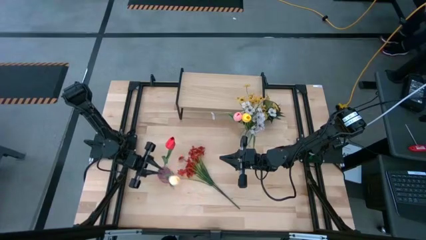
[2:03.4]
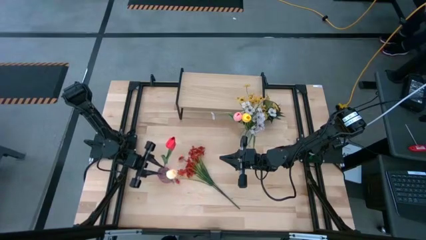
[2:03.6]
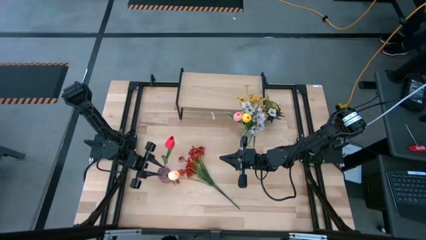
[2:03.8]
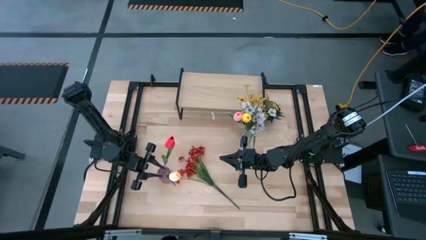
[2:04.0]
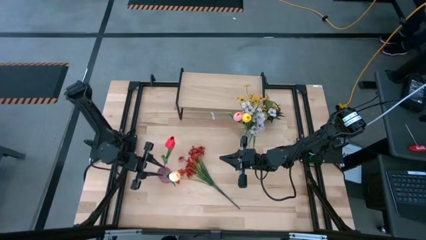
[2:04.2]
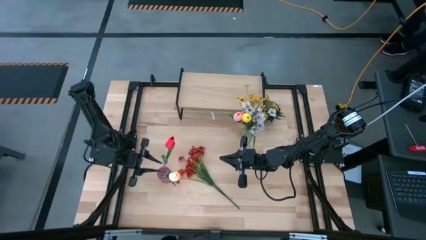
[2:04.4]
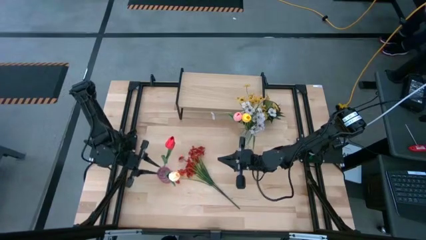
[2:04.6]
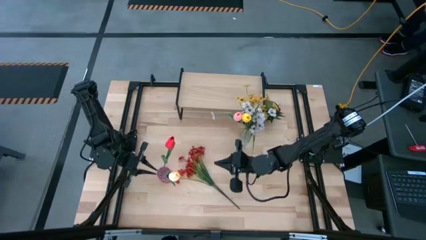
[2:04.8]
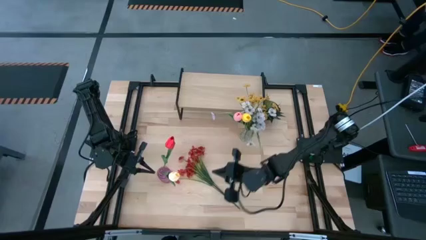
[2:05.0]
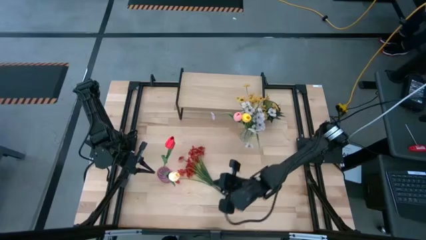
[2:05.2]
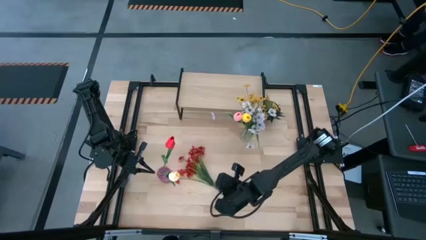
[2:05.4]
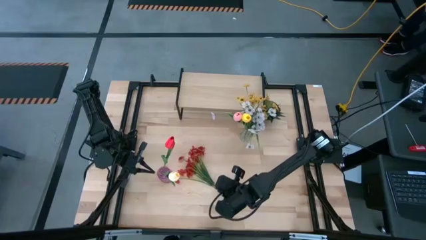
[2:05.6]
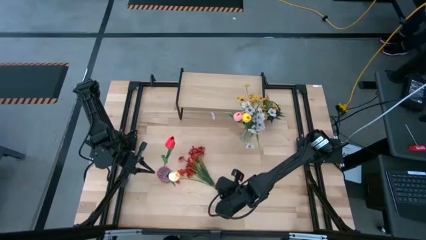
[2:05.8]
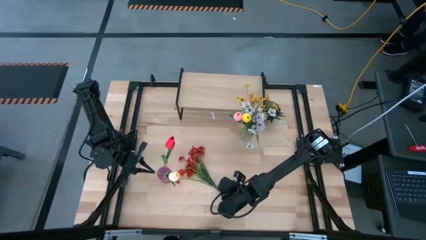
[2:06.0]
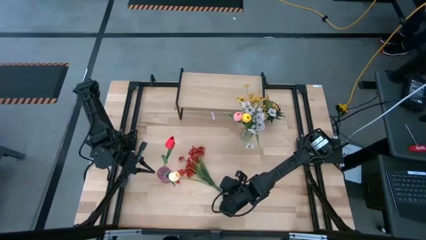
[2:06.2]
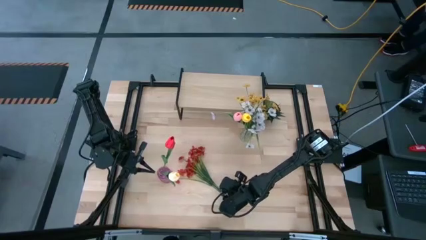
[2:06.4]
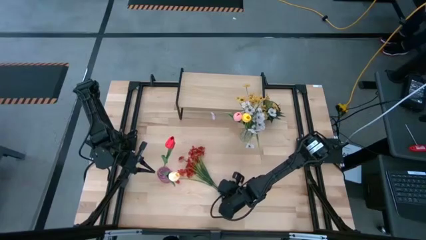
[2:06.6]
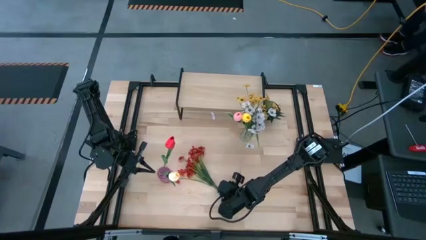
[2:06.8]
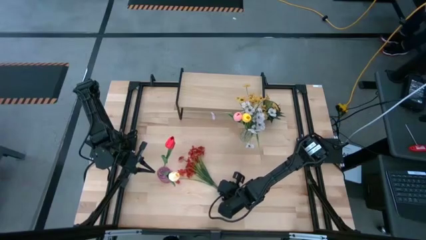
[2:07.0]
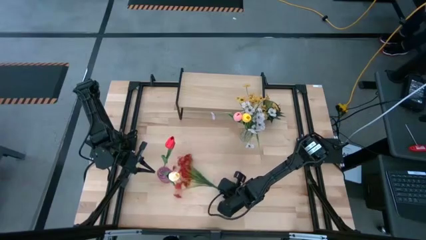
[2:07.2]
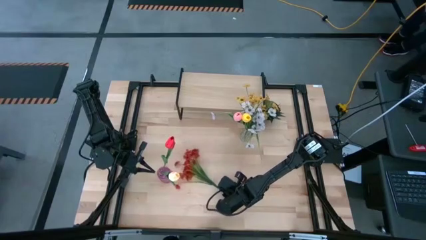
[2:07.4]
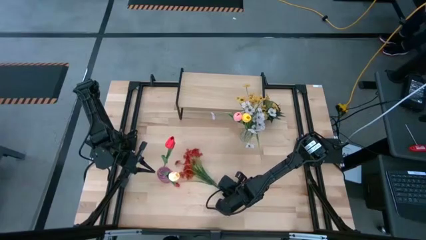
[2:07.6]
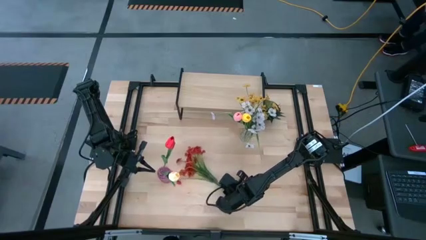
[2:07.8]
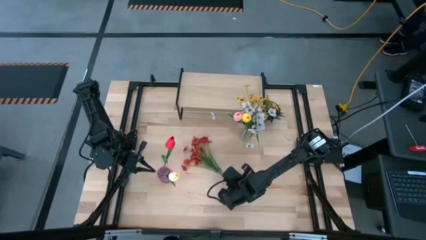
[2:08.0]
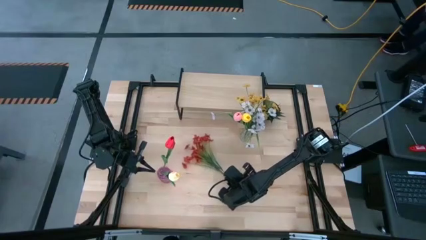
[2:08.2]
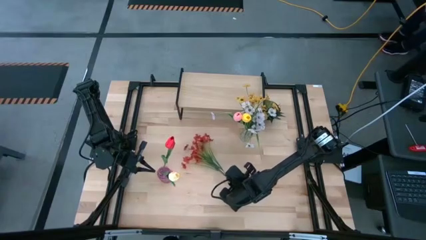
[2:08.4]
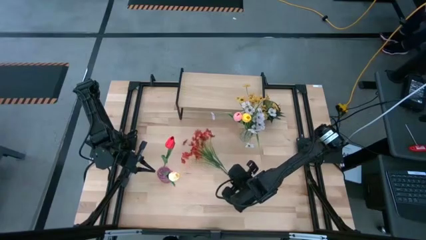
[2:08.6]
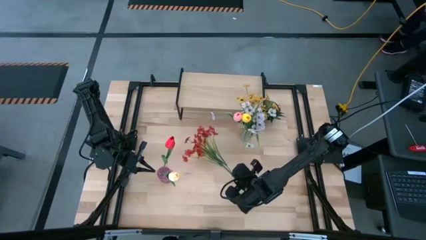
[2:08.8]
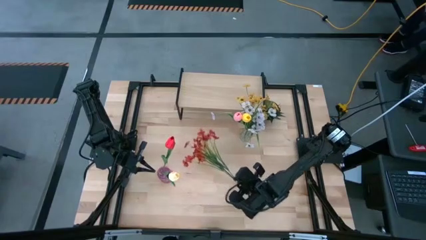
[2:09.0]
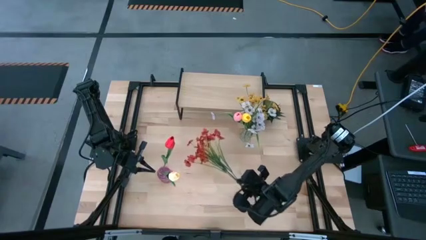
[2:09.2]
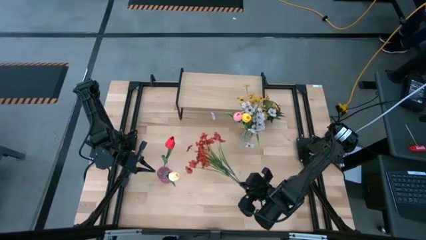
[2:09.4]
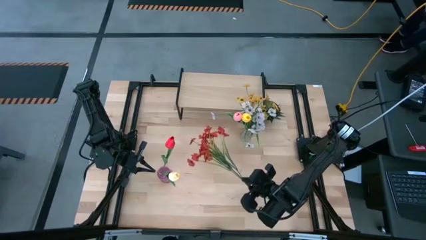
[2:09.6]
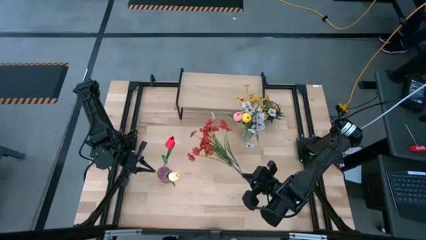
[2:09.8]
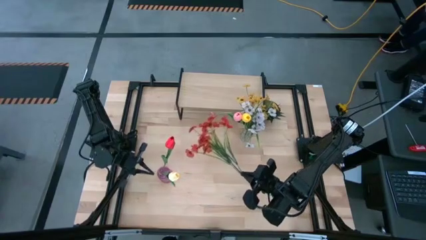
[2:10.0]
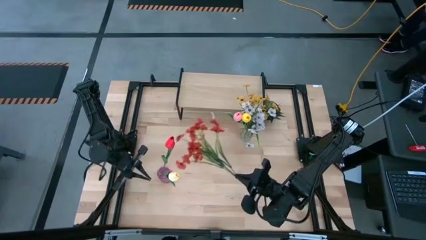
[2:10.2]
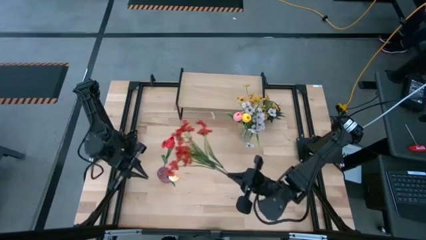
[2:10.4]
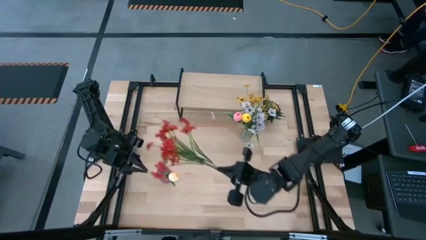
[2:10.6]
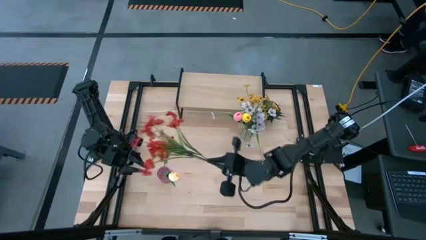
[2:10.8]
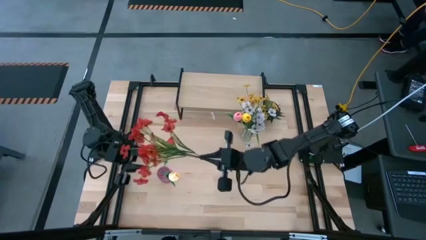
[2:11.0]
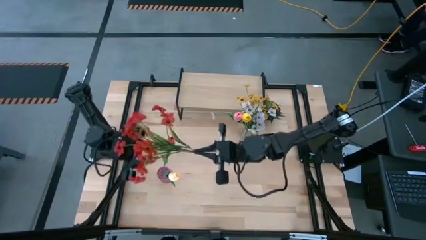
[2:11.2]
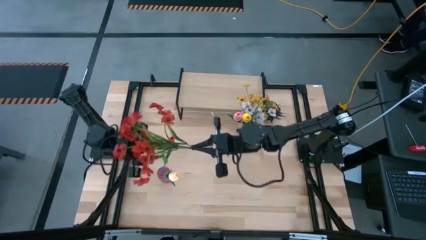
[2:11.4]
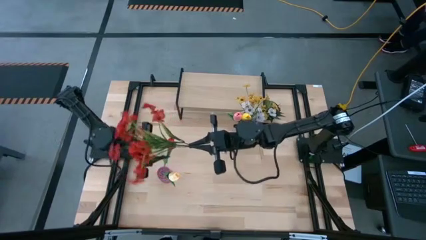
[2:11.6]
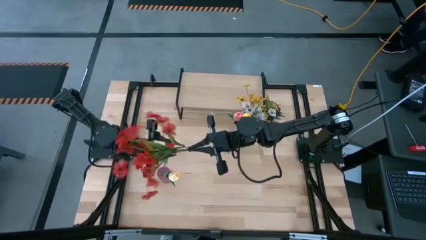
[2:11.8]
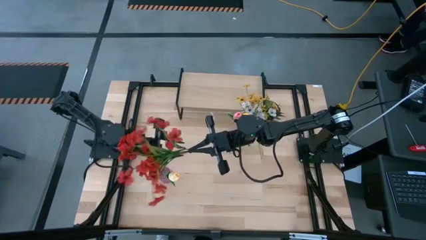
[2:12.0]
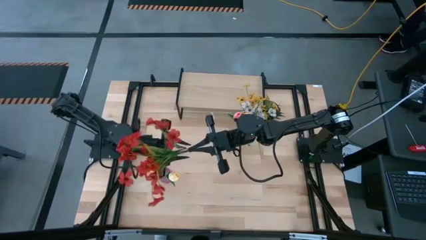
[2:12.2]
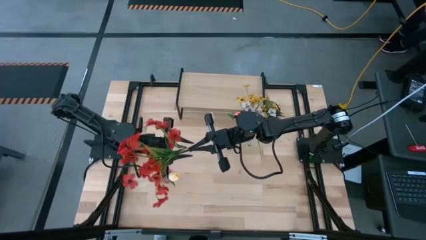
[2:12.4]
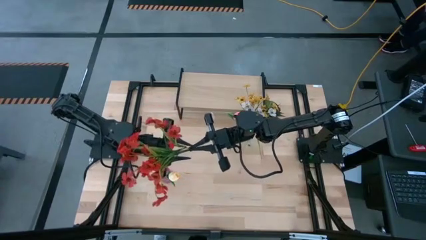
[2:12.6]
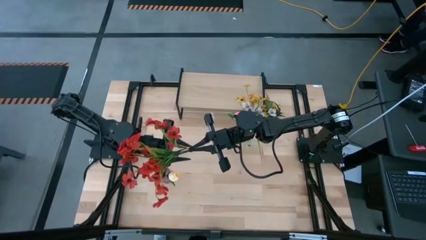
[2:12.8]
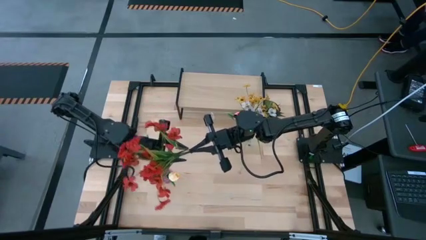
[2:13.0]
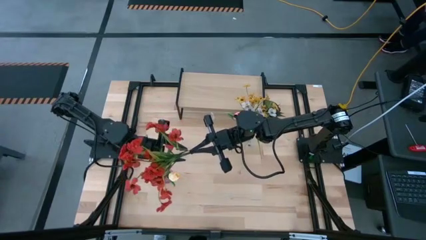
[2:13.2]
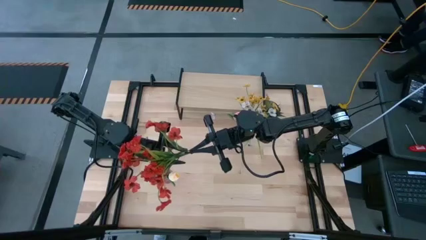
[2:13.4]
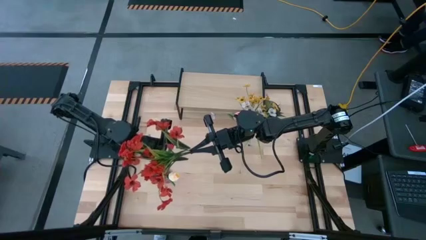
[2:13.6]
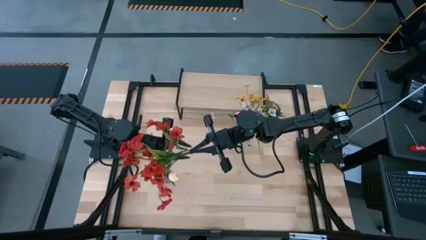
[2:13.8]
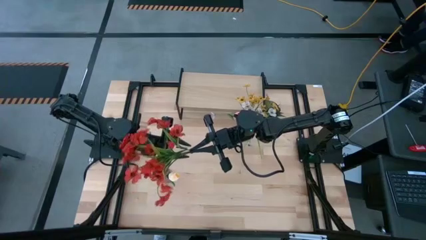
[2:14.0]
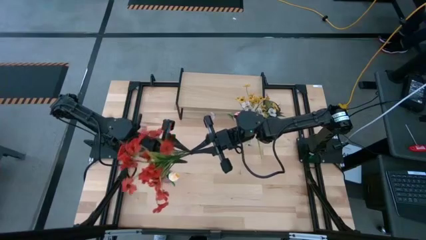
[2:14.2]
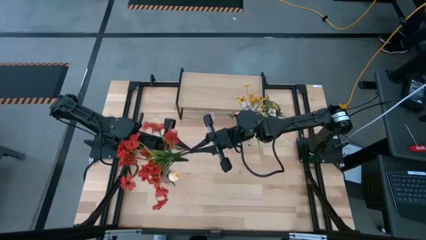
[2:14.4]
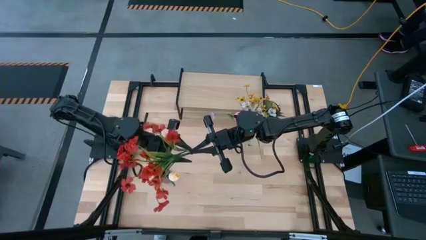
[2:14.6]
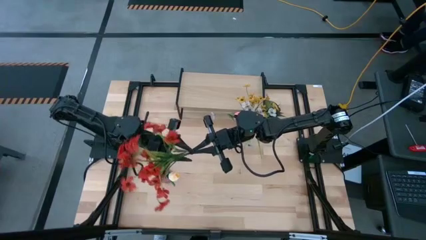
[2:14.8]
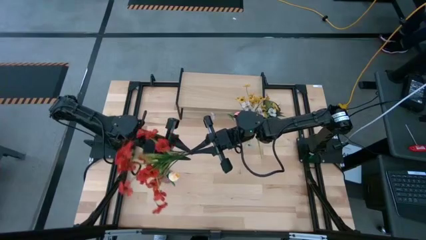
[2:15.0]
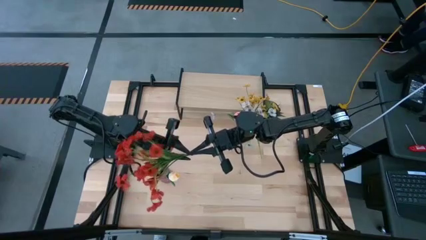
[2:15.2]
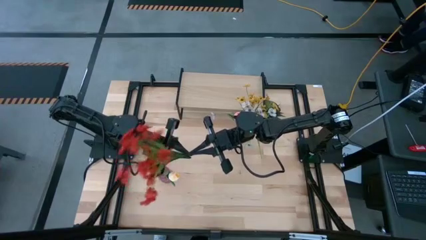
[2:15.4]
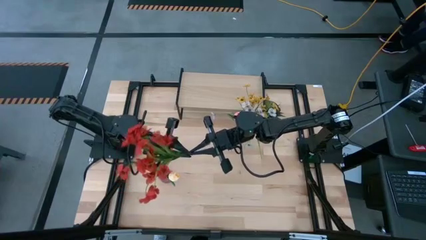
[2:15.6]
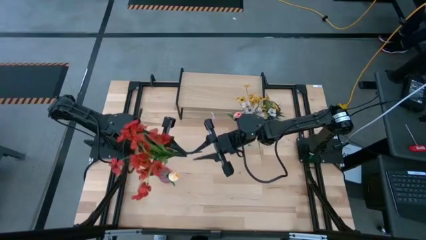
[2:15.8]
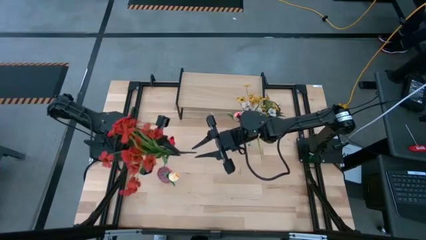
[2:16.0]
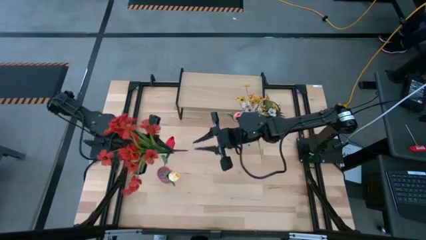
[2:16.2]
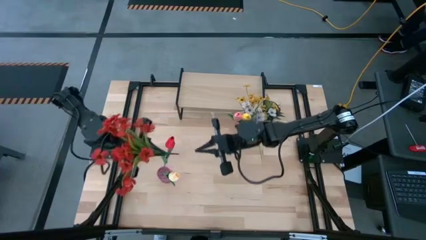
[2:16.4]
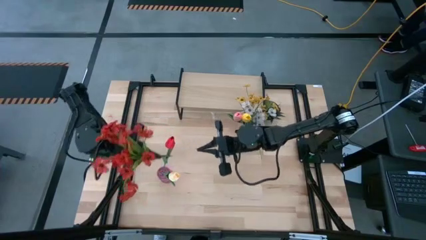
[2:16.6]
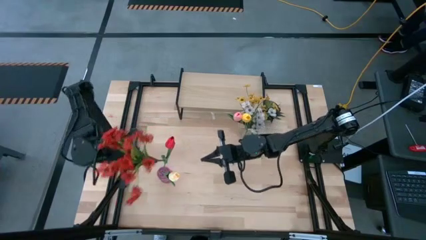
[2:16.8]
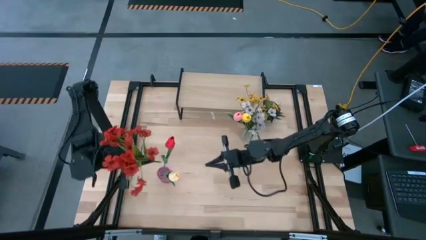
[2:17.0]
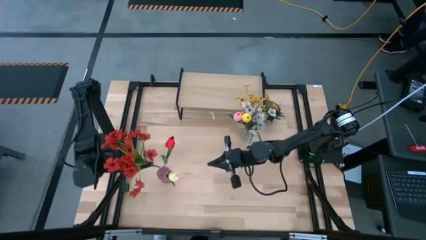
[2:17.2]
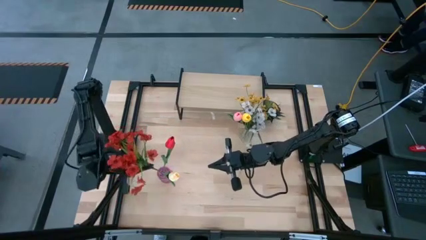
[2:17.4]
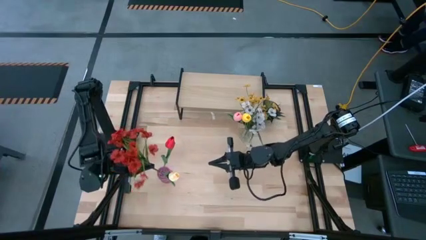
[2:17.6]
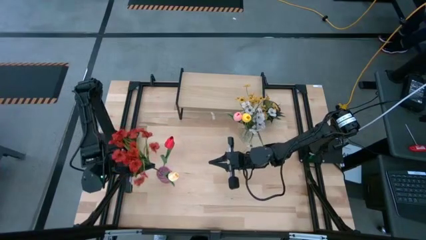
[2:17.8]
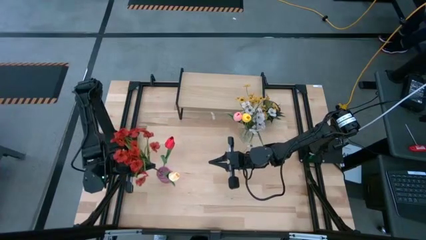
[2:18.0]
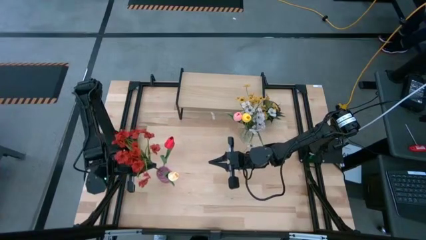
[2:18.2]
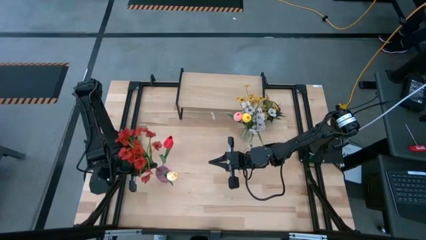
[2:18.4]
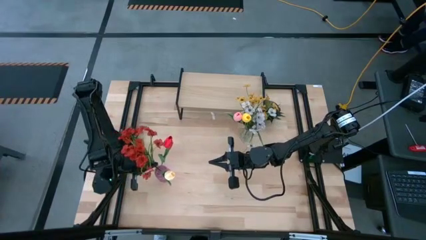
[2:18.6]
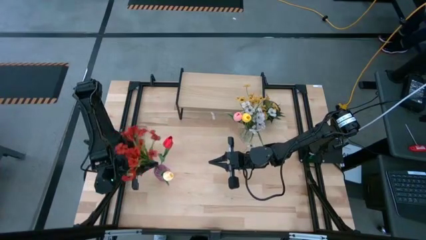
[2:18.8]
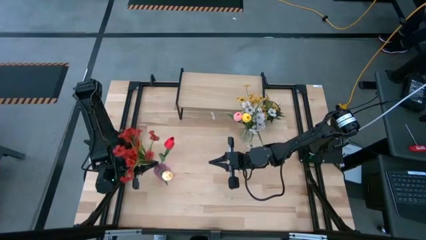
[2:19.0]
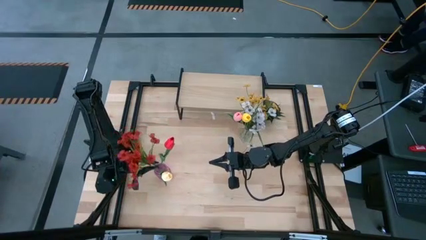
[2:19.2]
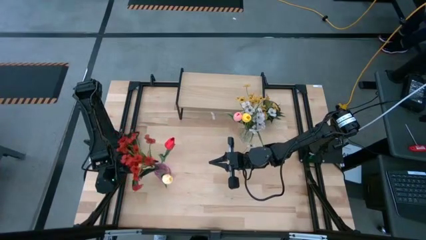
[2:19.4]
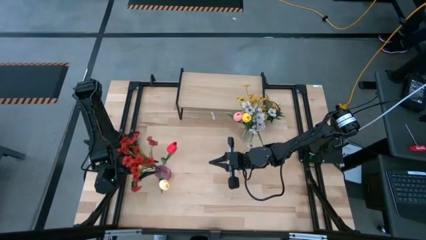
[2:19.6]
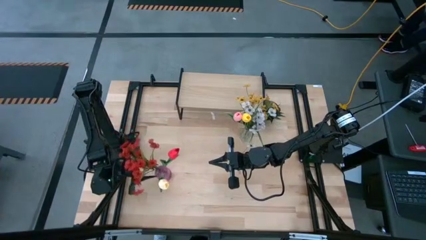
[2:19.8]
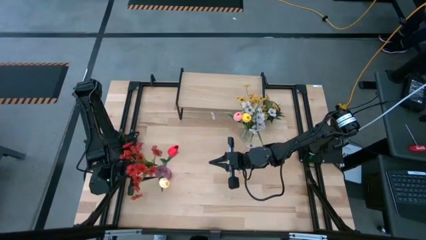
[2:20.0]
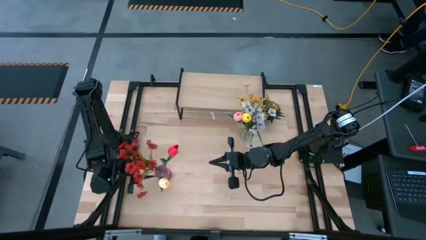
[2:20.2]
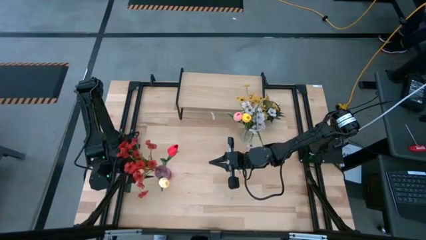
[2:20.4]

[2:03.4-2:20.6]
Task: Pick and place flowers into a vace then onto a shelf
Put the red flowers into the violet vase
